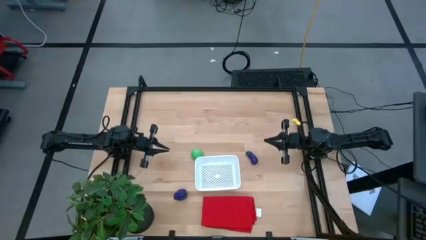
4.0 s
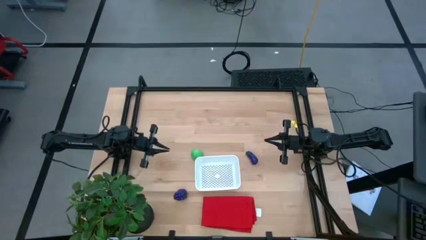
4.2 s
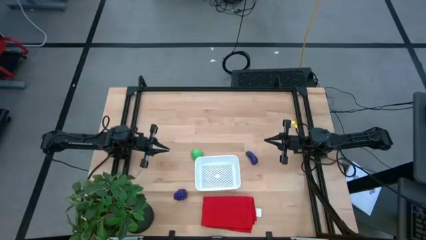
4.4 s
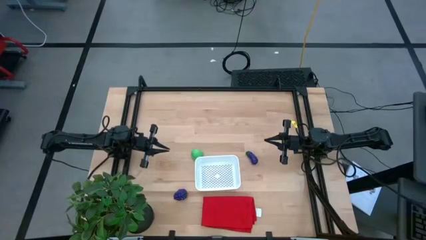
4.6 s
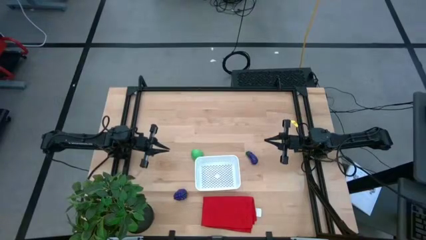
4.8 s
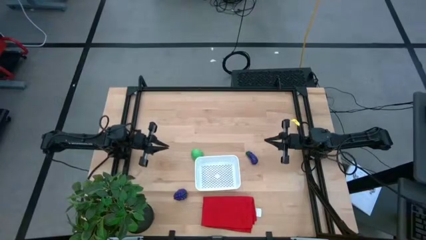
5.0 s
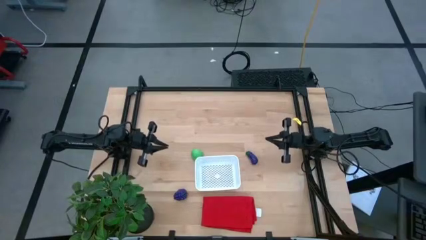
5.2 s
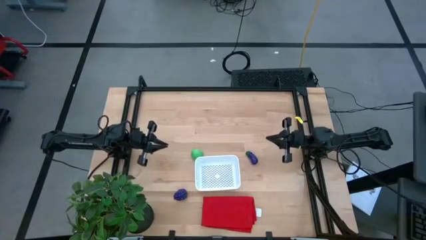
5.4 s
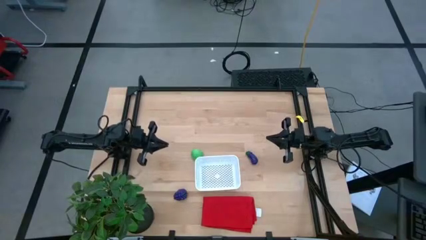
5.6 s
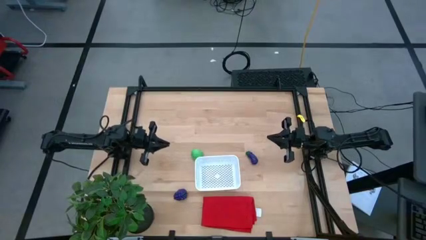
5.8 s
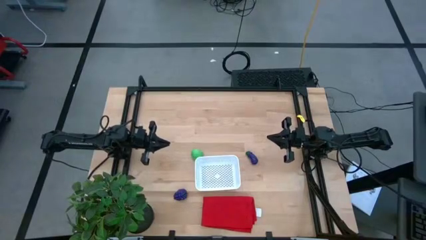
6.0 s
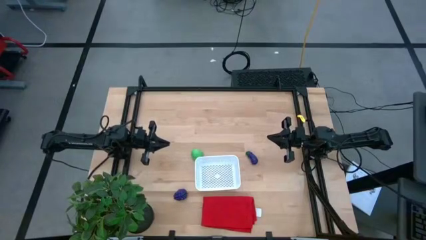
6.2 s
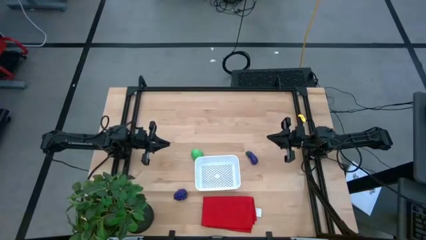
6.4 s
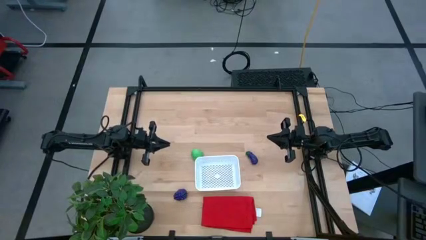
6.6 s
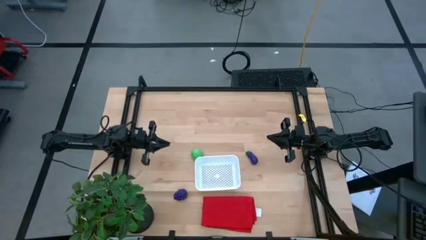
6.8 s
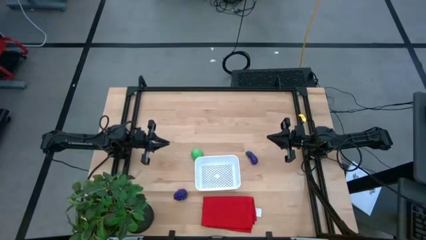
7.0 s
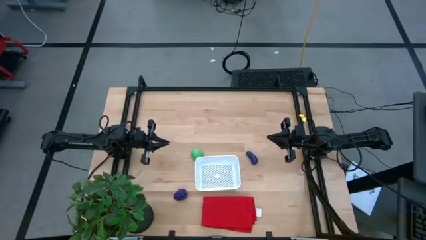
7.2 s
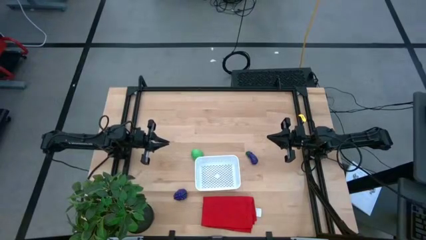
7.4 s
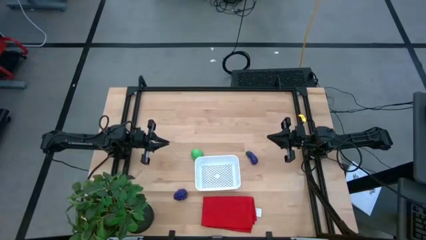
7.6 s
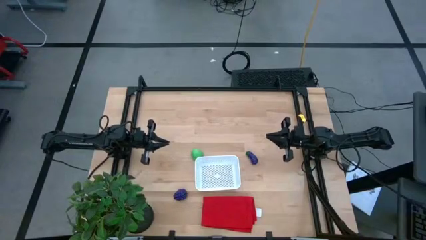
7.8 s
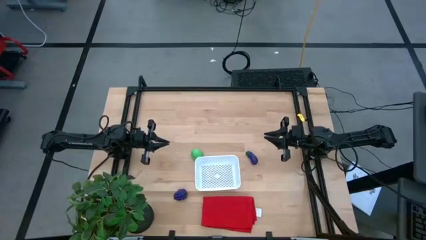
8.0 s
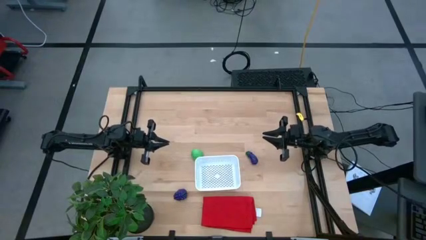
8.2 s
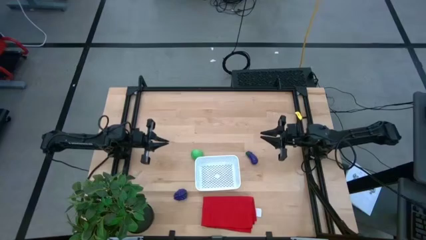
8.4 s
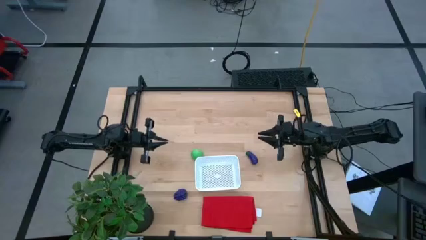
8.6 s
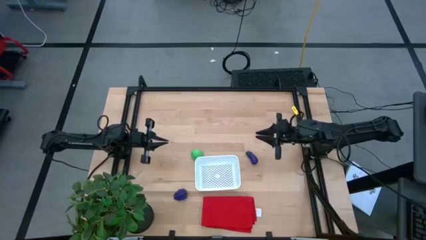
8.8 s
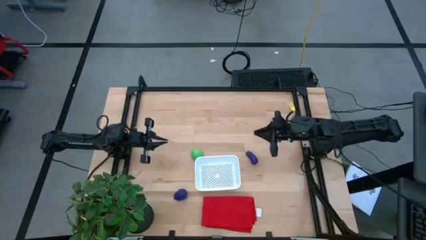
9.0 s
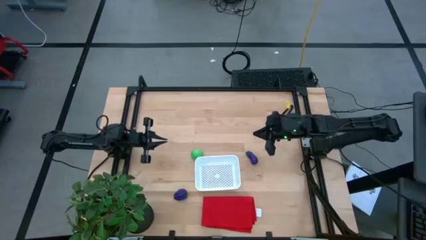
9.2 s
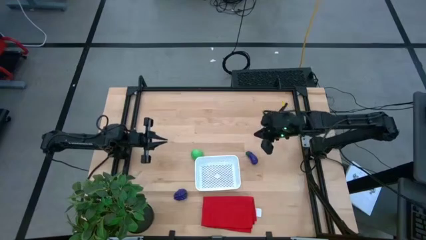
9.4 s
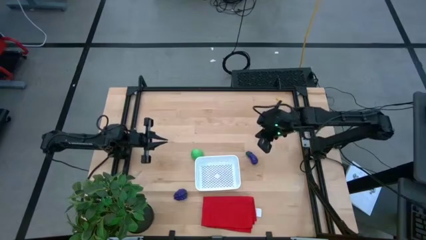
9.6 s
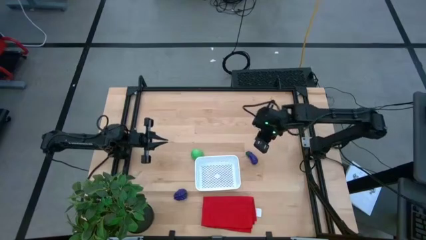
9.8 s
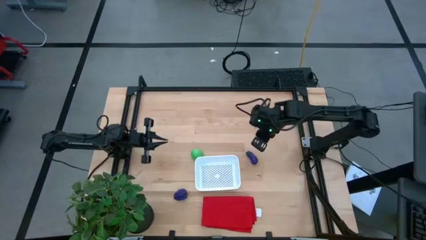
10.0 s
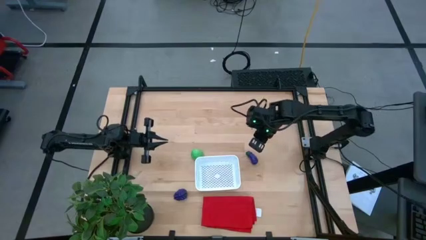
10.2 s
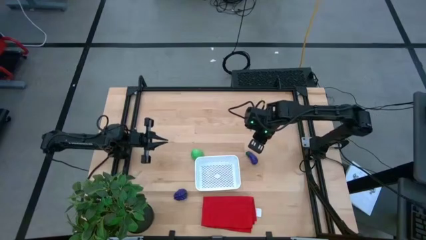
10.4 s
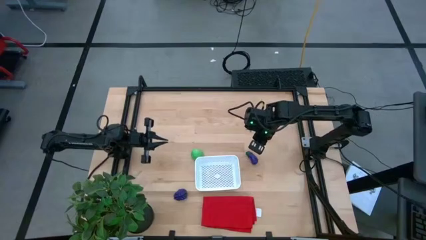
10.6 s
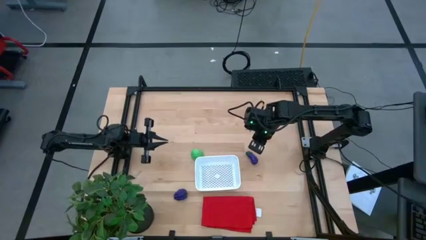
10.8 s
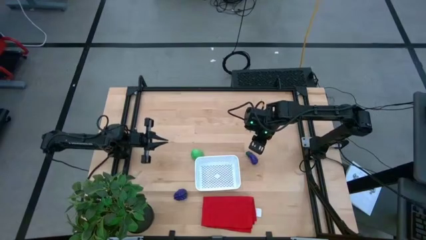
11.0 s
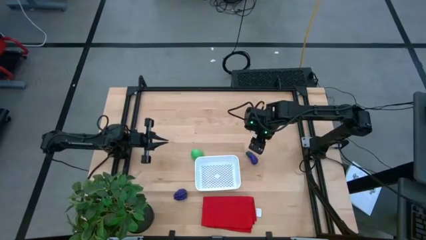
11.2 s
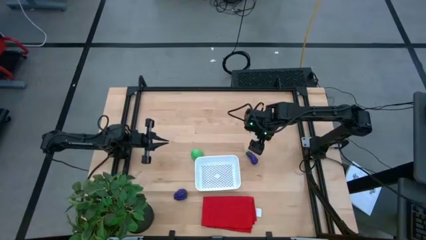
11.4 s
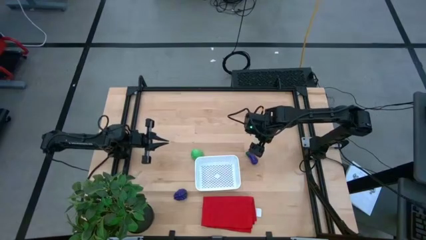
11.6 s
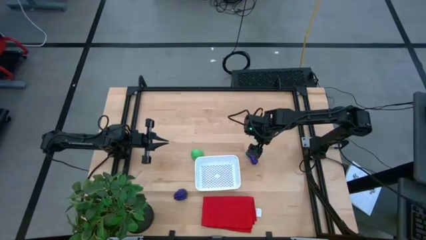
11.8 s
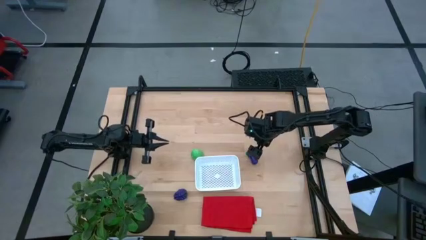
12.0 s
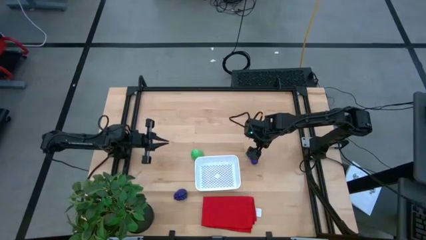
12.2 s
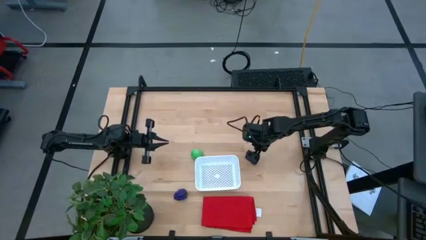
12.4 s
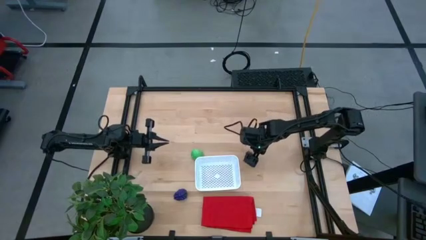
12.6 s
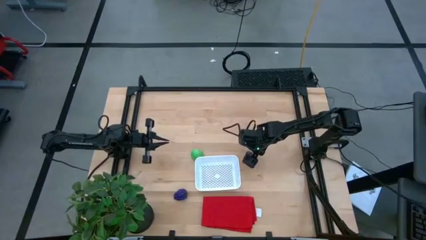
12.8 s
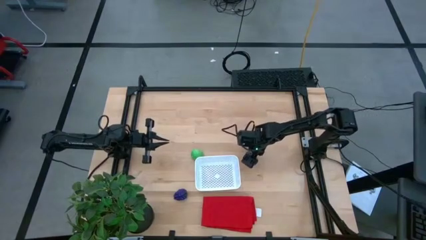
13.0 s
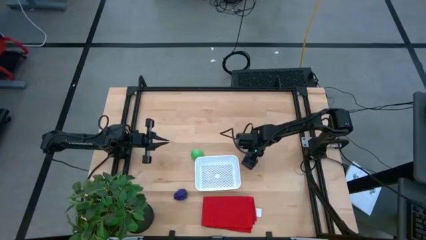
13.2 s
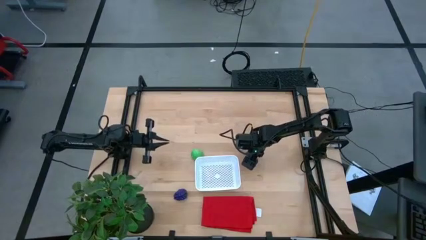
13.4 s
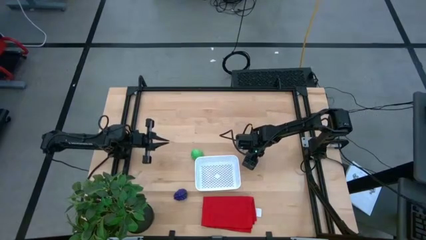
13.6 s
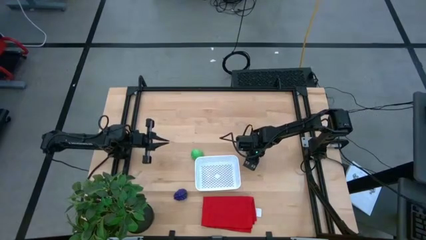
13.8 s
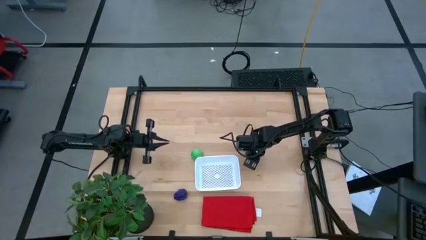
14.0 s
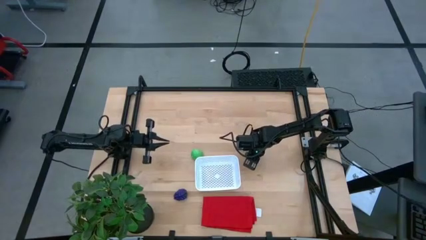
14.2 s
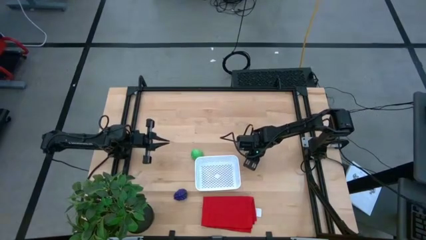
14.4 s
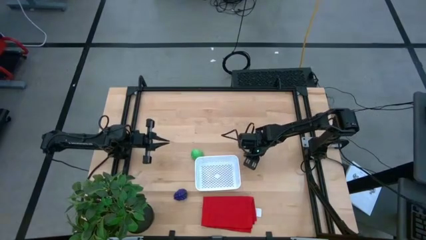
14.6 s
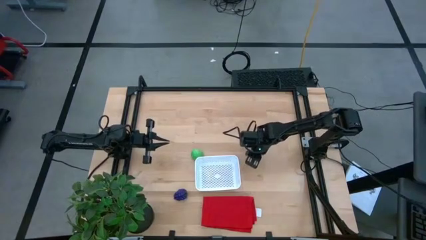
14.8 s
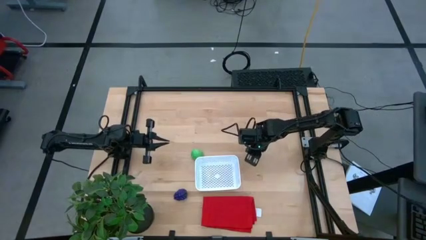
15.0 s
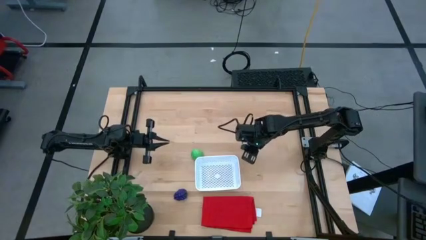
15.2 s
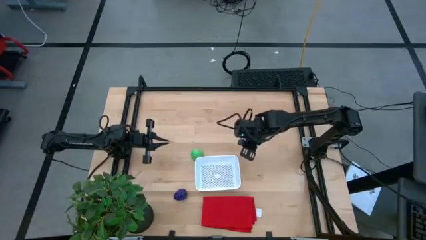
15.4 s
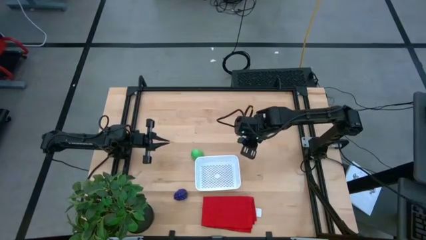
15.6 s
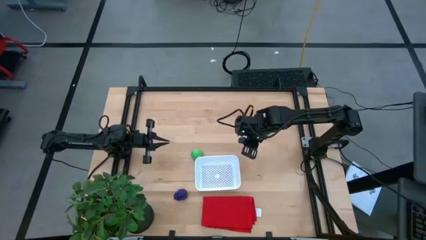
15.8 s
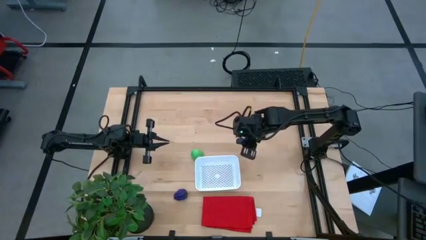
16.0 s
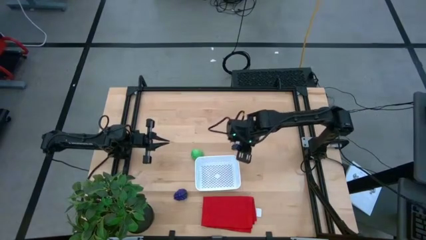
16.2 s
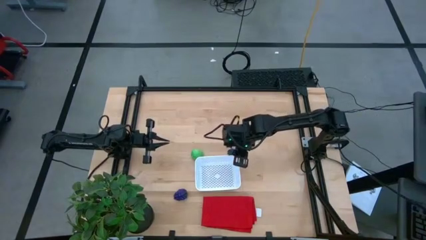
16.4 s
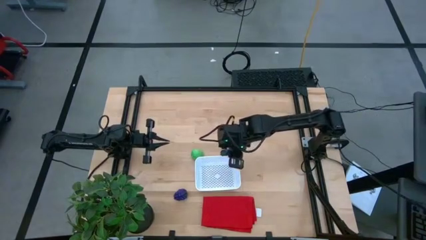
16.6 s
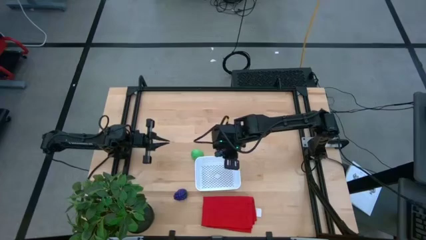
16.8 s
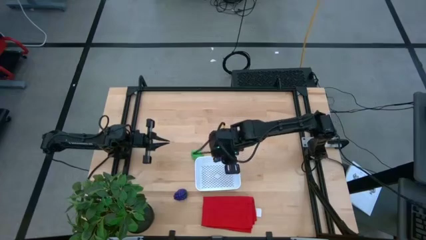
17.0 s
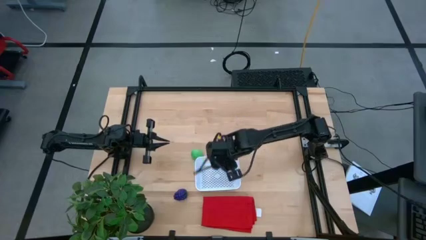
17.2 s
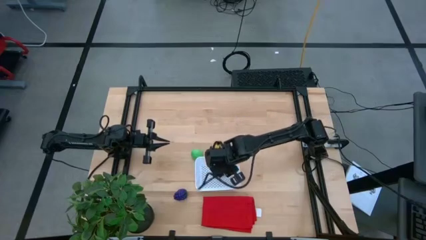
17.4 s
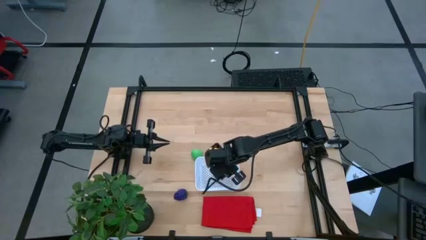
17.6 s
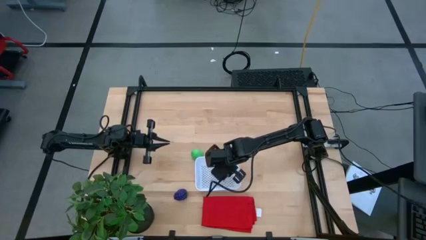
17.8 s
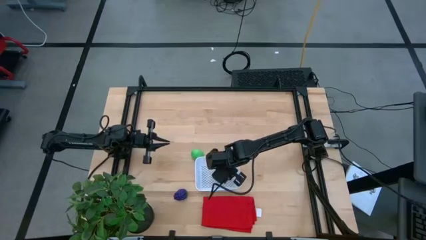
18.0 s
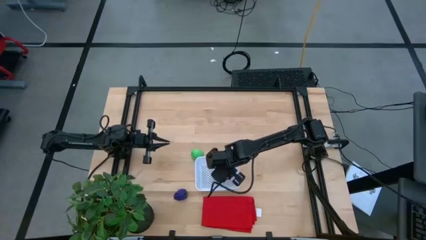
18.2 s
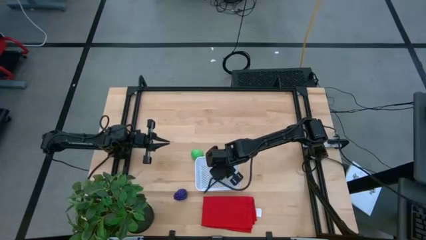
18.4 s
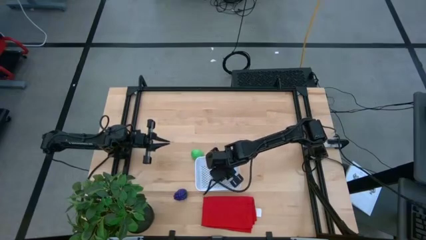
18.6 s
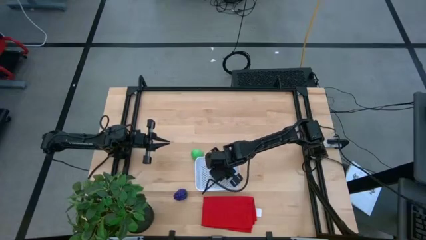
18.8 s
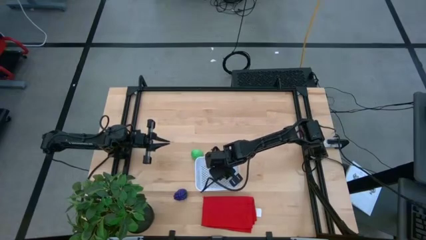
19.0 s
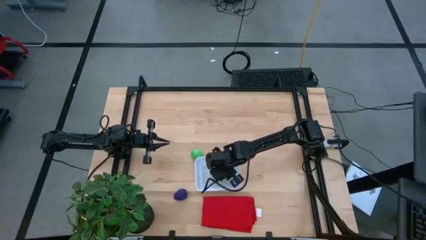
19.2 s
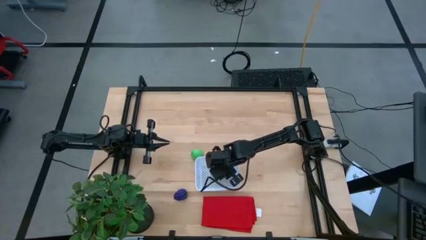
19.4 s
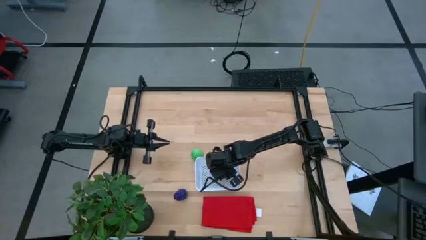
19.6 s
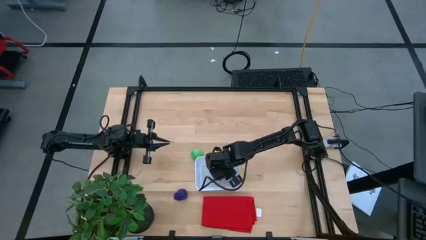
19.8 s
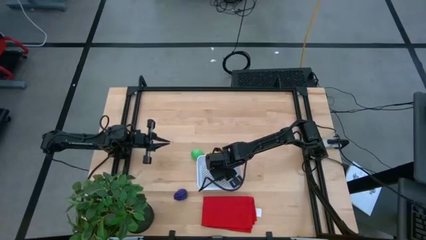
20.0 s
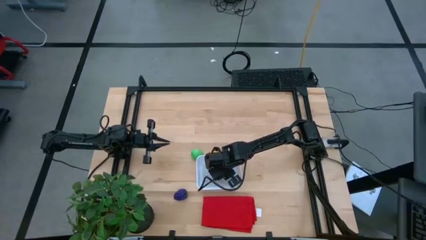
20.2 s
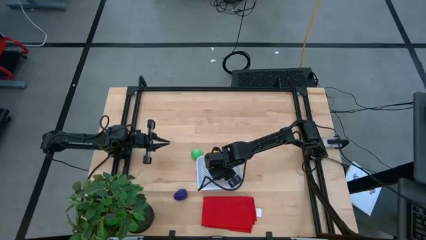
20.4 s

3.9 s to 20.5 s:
Task: Pick and placing Produce into tupperware
Put the violet eggplant into the white bin
